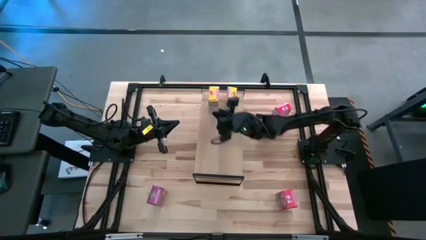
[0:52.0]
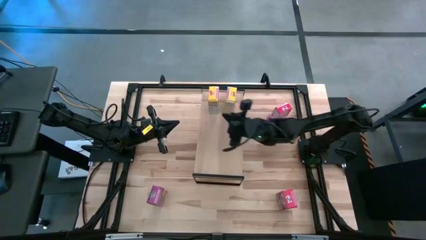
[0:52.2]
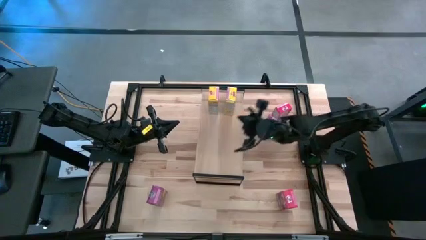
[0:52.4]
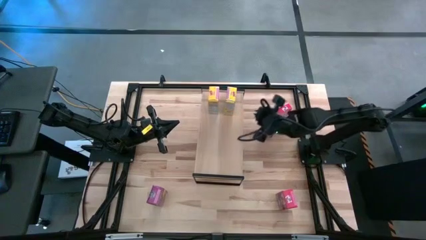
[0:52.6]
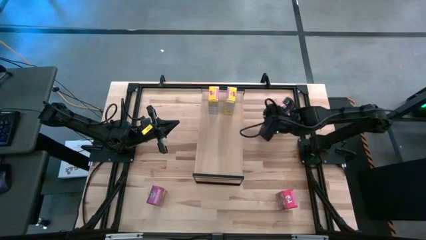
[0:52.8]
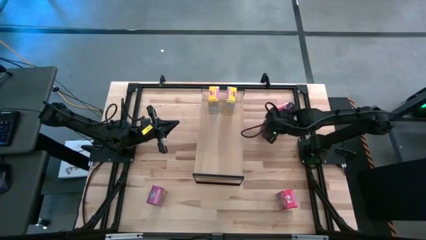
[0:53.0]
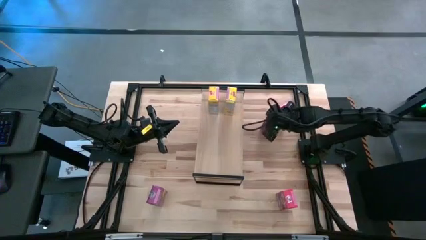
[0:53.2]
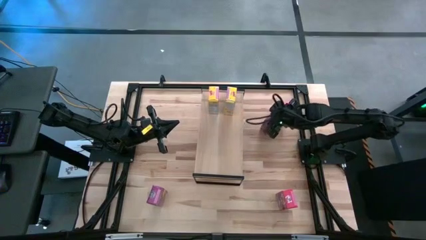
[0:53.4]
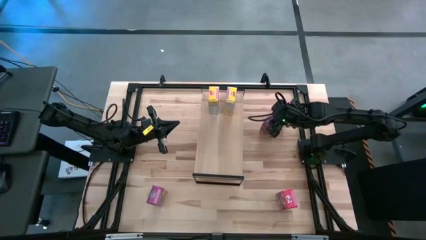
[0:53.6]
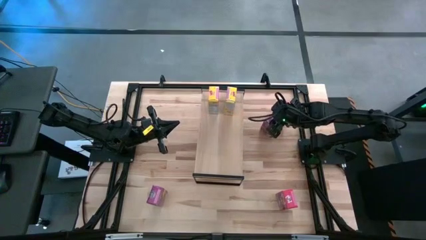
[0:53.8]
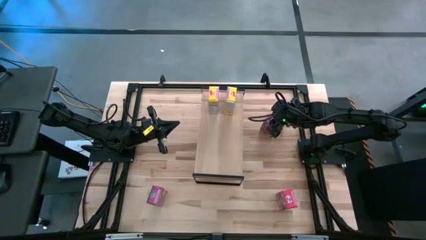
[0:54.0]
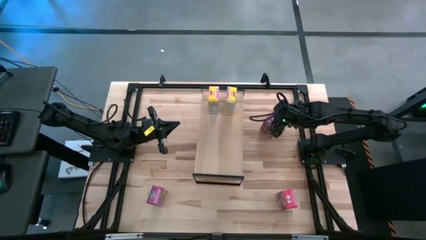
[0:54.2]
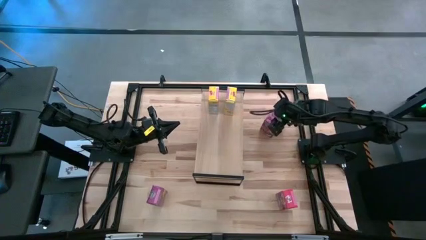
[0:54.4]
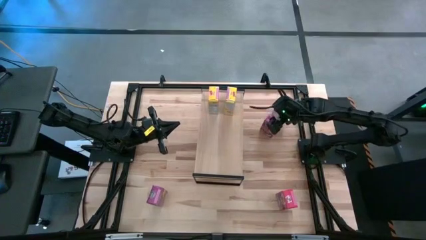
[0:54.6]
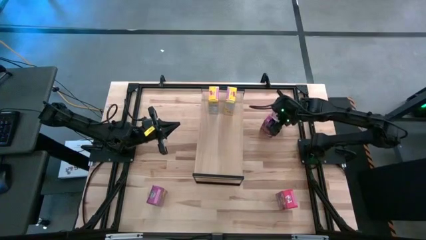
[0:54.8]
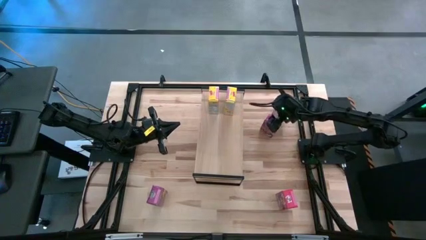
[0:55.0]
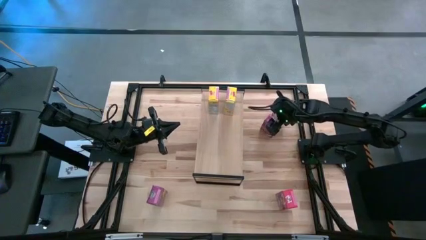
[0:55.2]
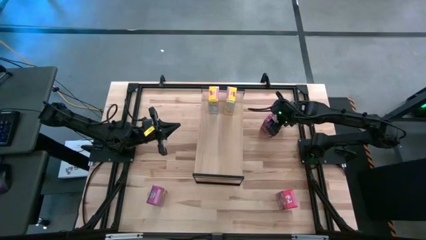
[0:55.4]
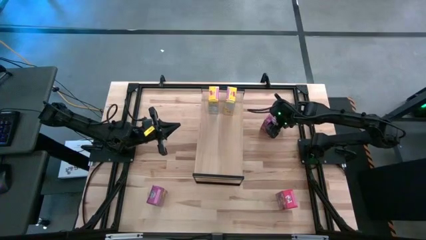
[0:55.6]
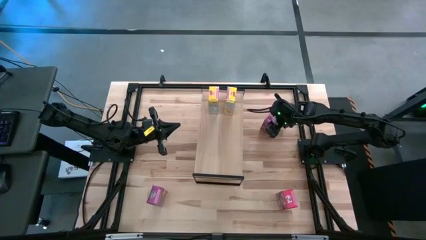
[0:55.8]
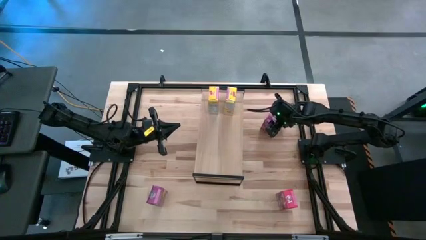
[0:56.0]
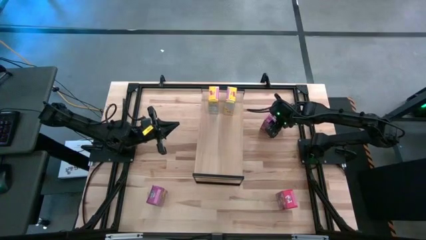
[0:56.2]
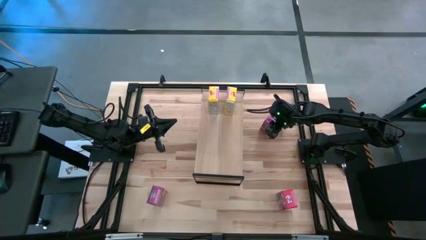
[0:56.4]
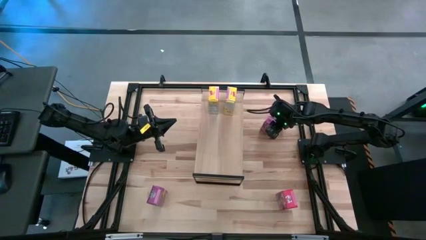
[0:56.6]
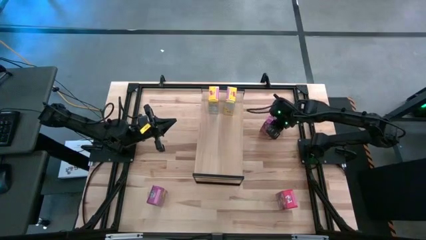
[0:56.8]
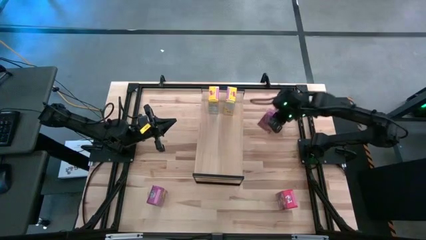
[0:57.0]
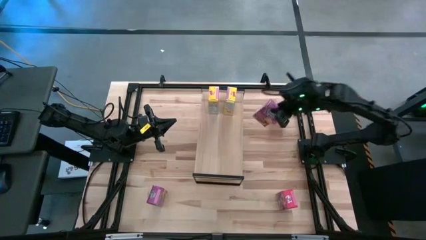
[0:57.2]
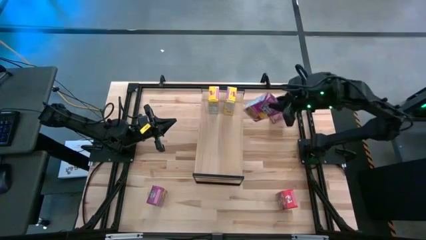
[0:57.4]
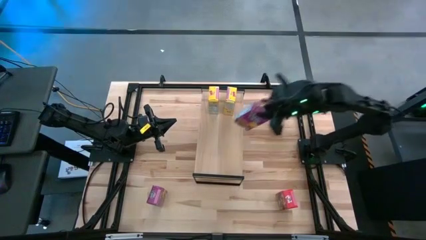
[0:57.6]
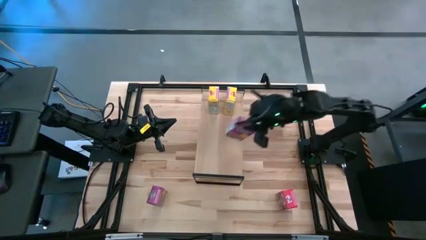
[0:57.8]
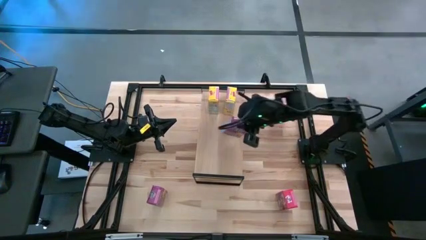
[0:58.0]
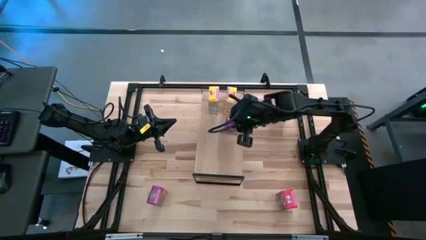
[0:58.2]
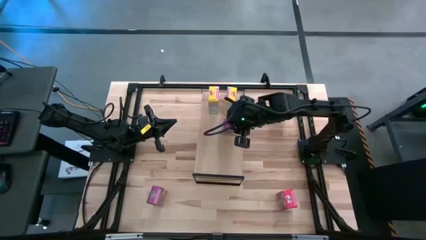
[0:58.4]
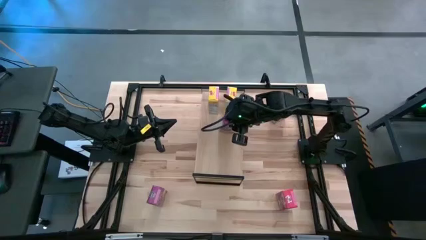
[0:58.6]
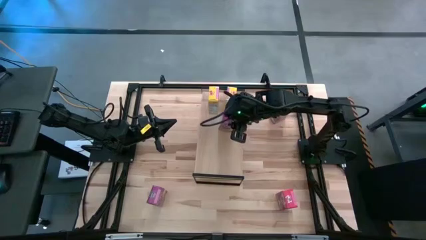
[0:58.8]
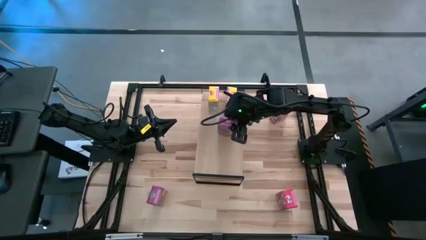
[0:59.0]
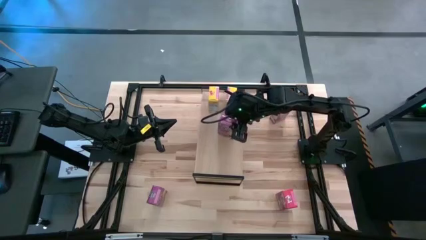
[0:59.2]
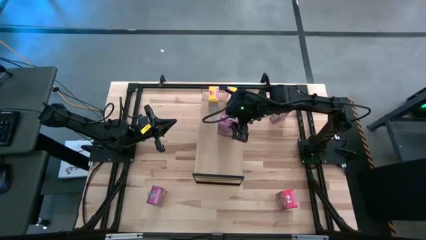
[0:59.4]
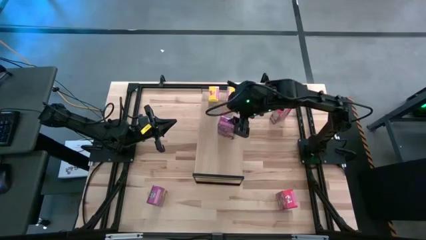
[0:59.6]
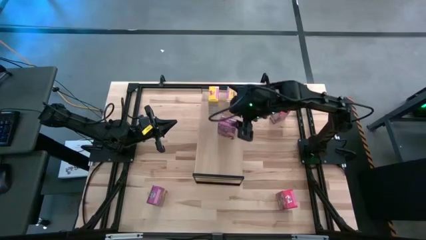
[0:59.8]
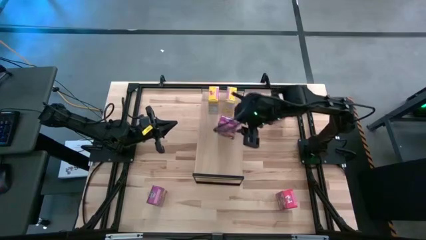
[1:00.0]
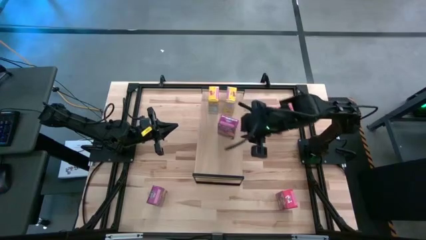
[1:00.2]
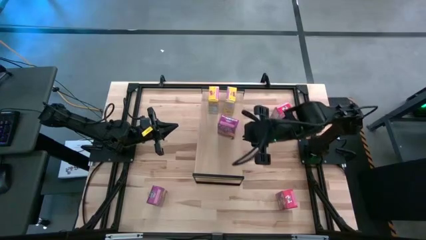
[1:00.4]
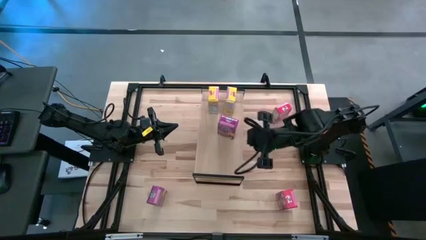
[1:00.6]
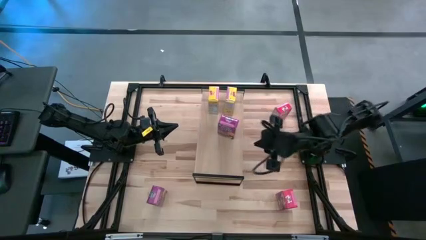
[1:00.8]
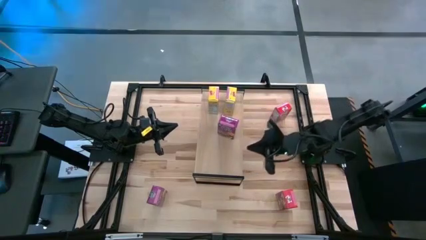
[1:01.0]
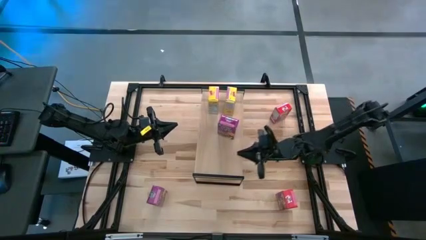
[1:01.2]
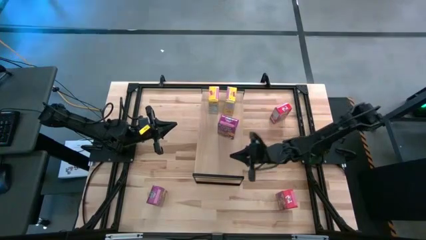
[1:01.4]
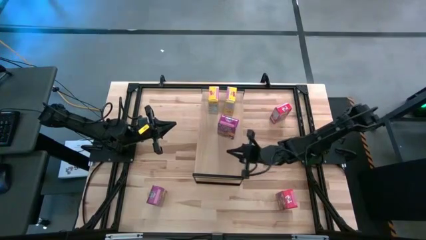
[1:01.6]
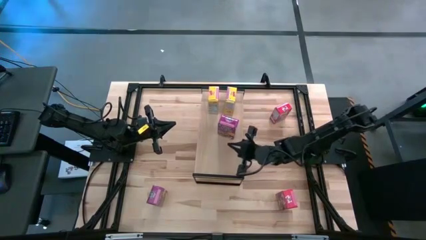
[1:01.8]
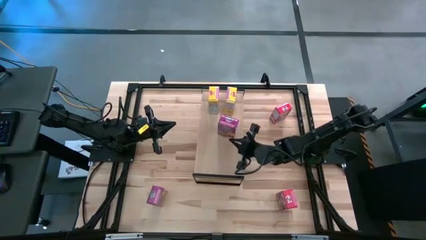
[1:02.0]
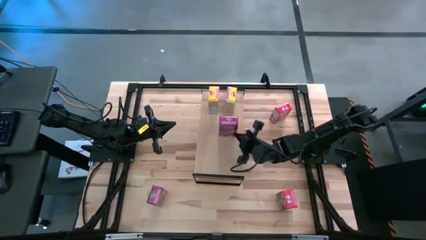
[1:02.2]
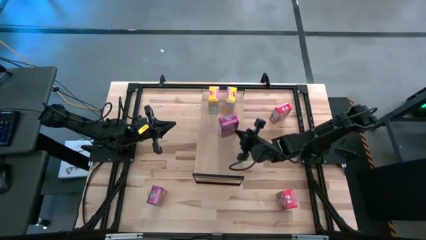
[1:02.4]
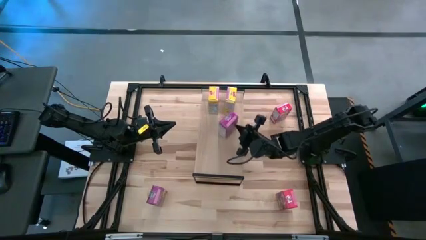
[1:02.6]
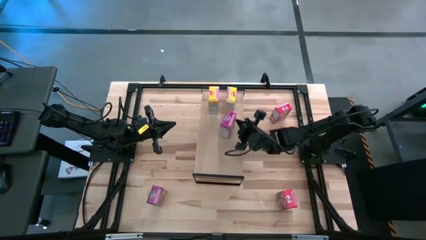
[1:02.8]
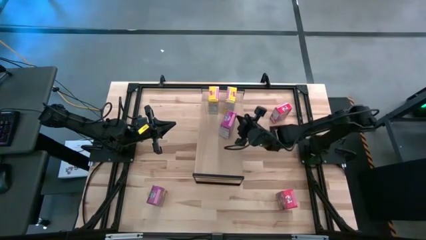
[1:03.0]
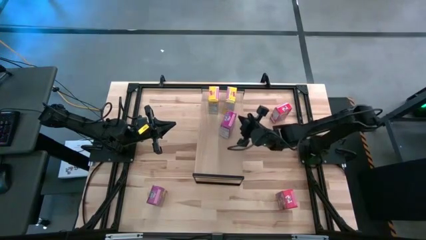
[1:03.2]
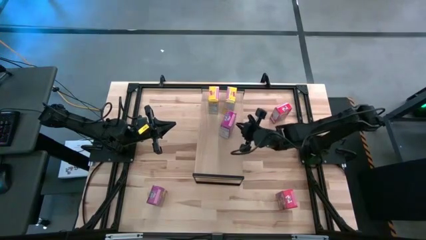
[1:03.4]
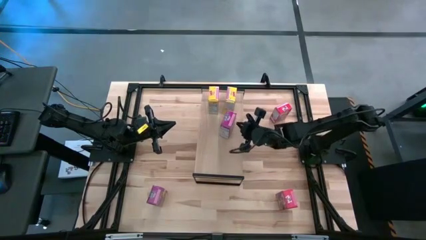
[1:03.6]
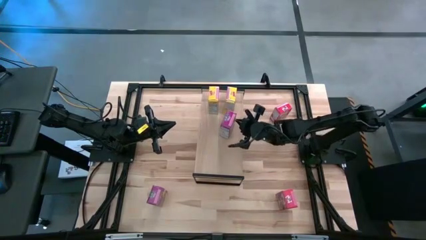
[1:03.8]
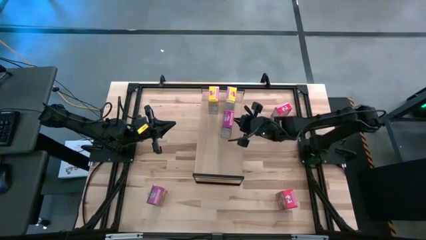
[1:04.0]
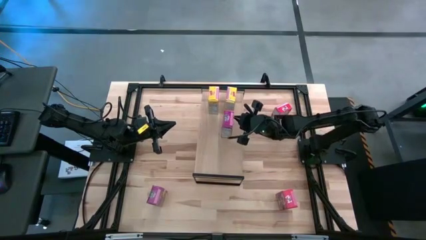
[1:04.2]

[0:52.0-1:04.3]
Task: Stack cereal on shelf
Put the top purple cereal box on the shelf

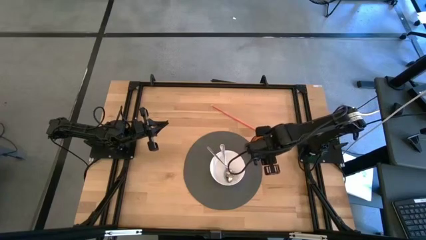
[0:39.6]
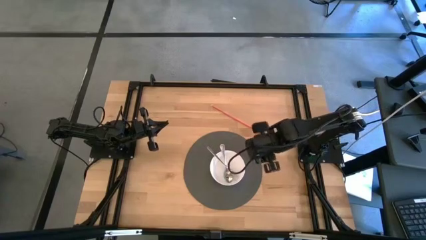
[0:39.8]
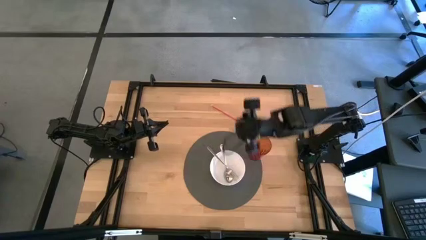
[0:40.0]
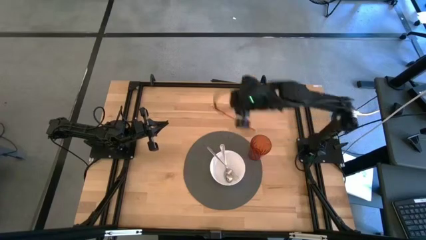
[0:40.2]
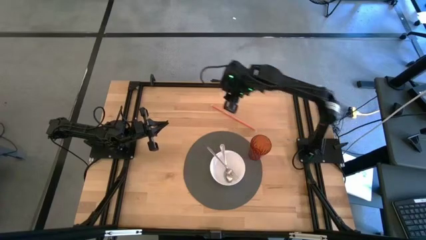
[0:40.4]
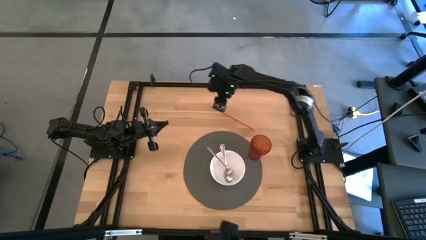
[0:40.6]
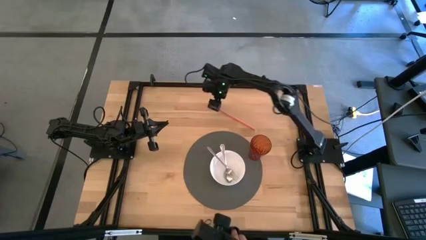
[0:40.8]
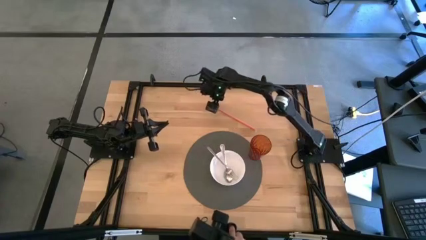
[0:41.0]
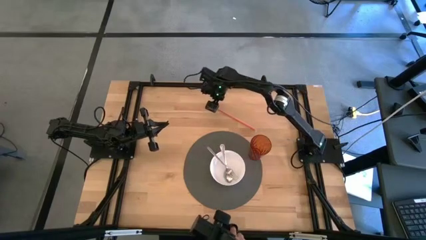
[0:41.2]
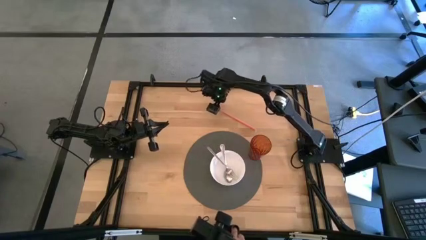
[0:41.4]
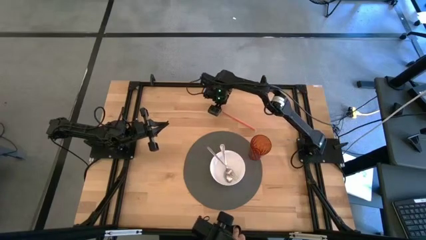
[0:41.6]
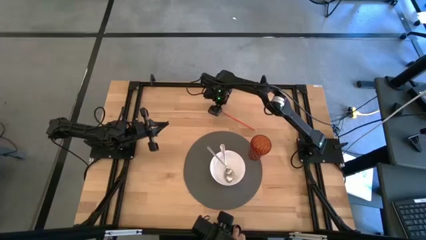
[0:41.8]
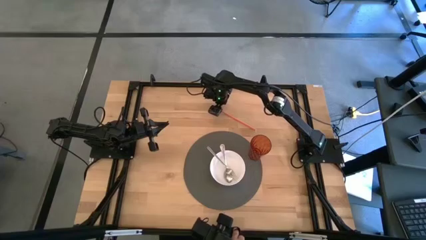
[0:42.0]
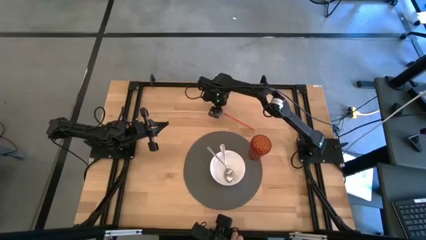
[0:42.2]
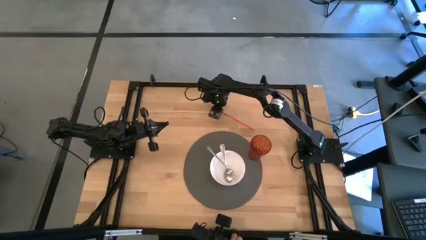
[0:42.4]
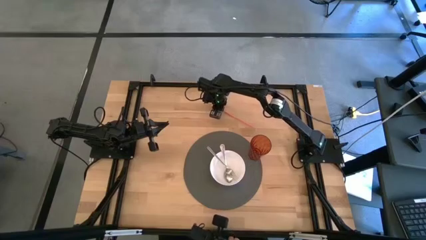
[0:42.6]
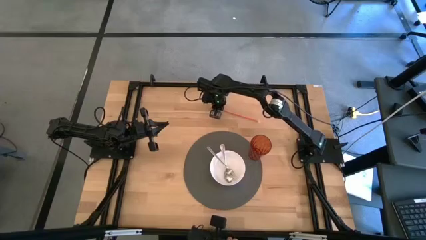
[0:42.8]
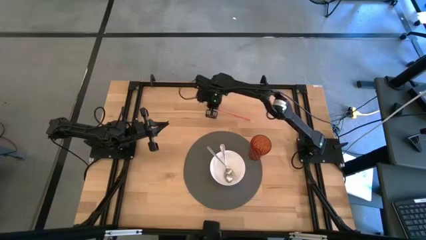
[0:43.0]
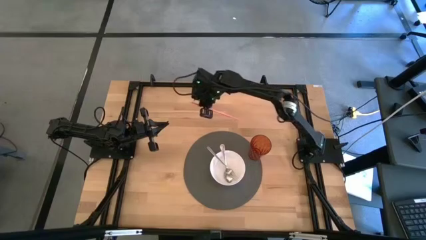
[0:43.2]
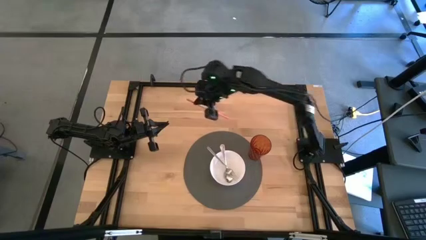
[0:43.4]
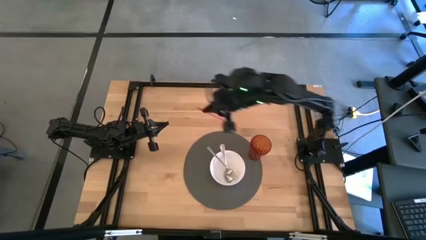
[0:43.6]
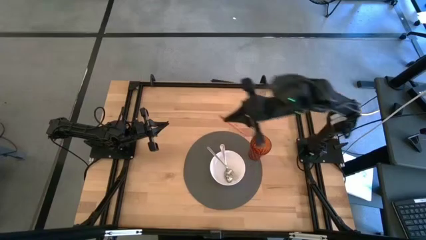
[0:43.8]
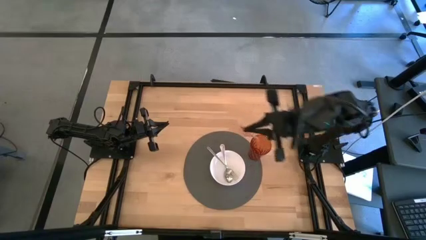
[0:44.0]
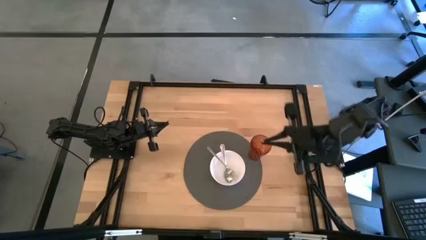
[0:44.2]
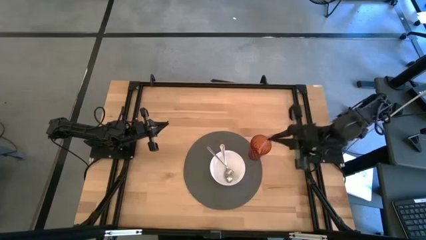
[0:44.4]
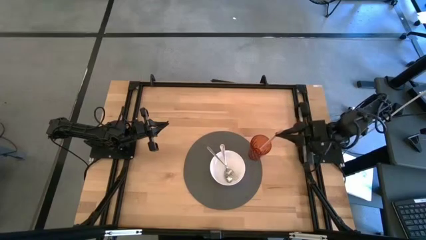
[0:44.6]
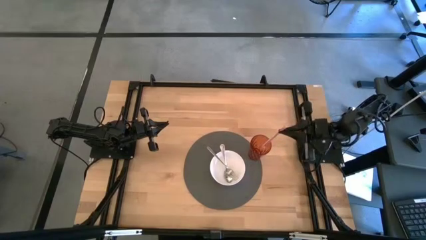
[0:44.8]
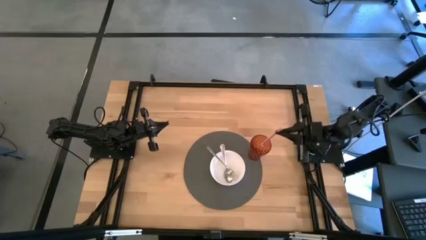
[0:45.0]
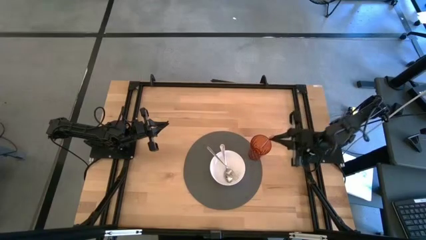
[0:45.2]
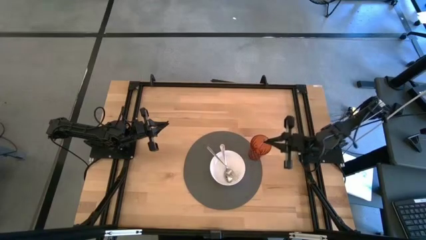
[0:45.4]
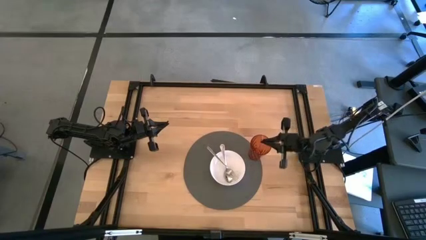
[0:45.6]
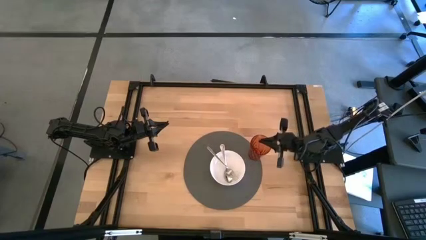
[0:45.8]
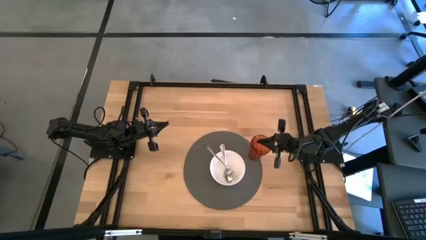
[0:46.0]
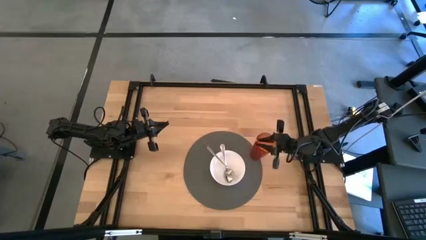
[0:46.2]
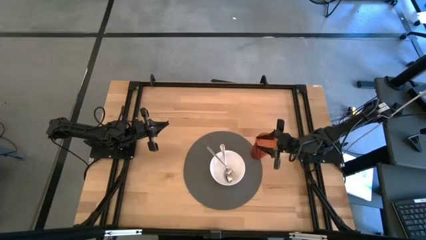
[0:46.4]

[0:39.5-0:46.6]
Task: Pick & Place Utensil
Put the orange straw into the orange cup on the gray mat
